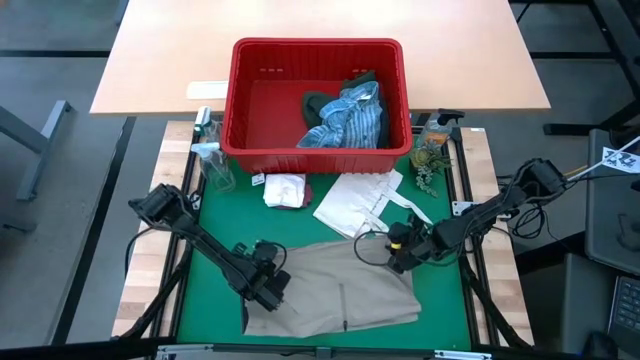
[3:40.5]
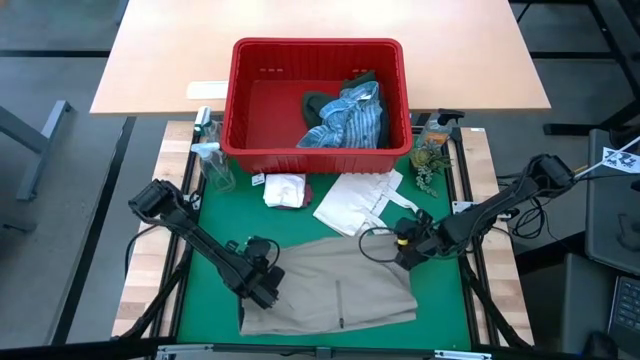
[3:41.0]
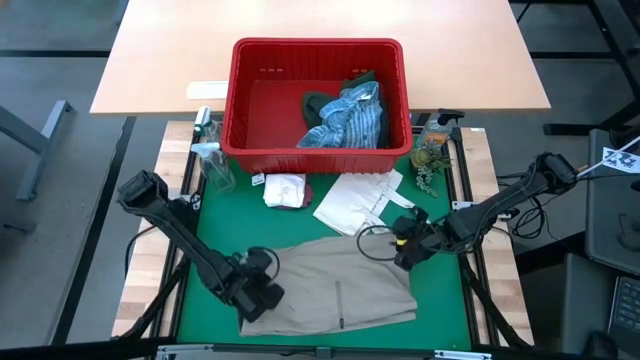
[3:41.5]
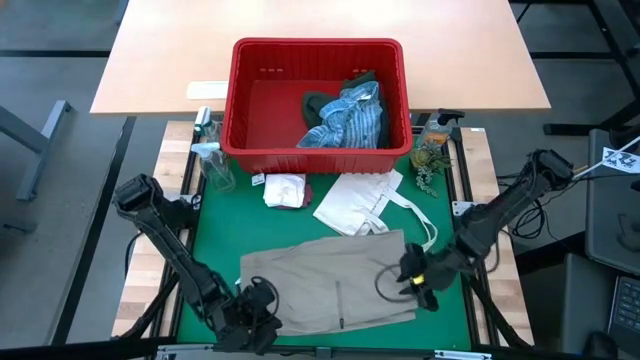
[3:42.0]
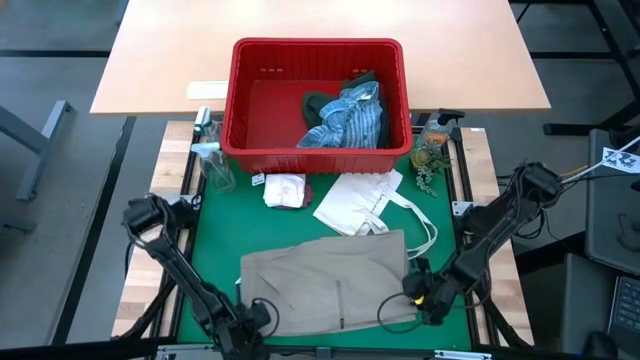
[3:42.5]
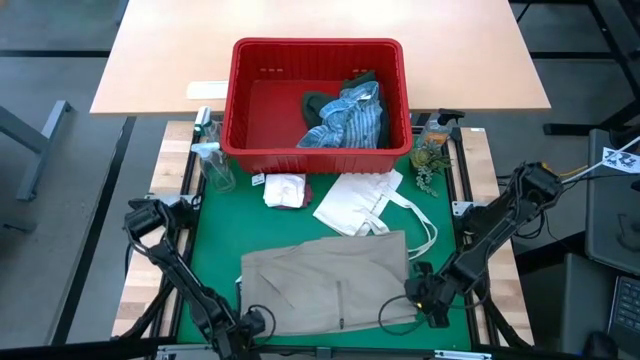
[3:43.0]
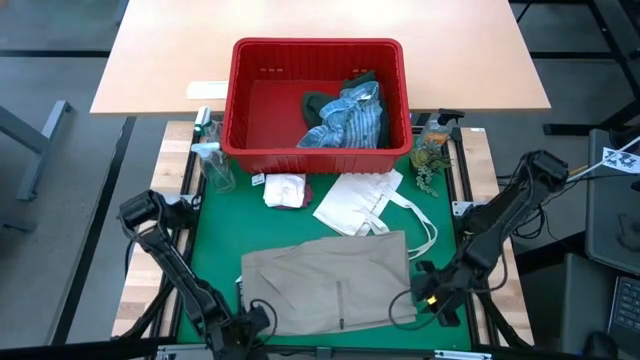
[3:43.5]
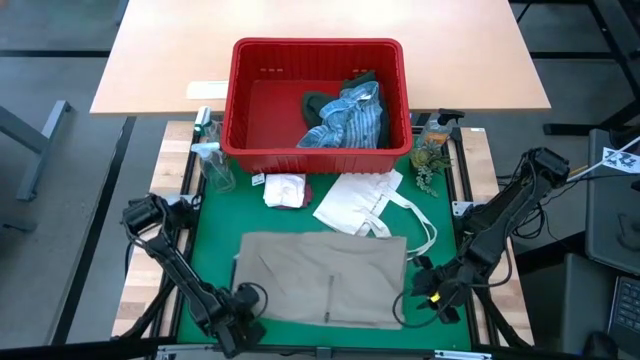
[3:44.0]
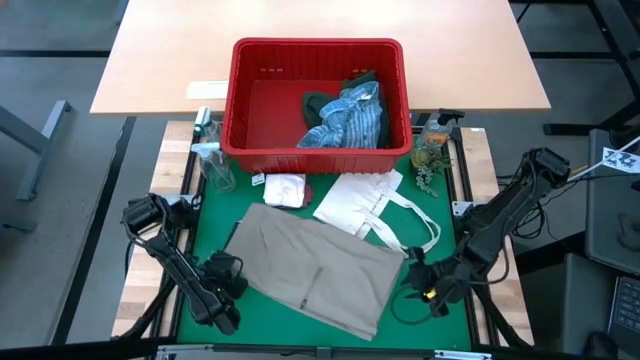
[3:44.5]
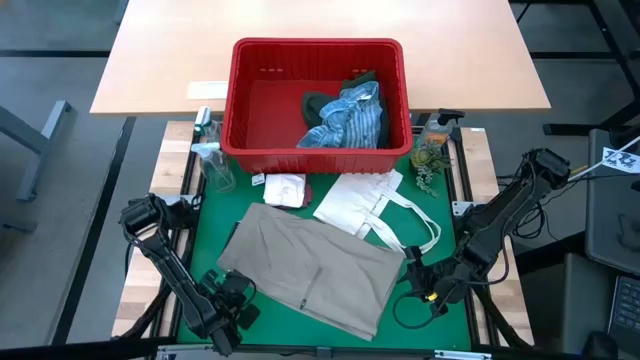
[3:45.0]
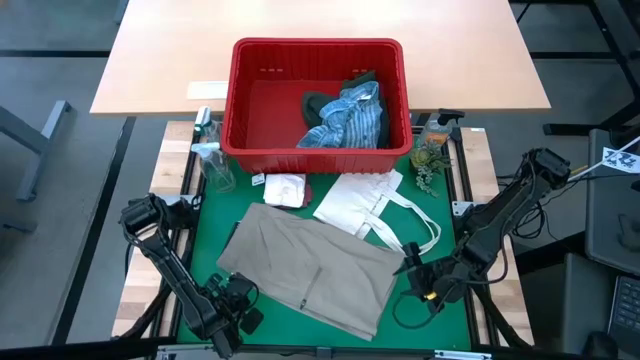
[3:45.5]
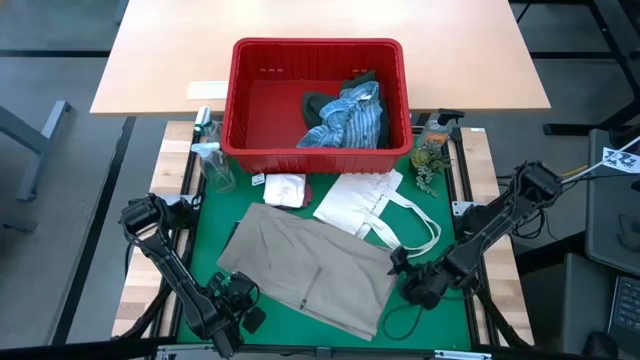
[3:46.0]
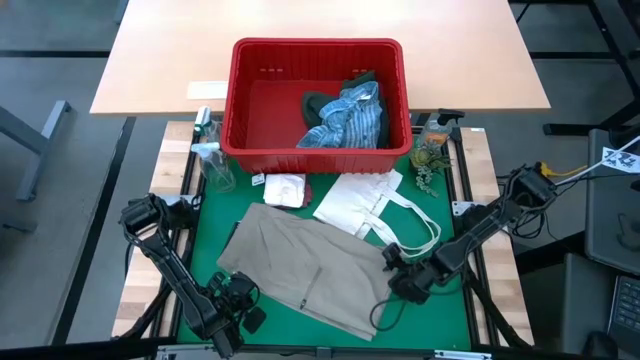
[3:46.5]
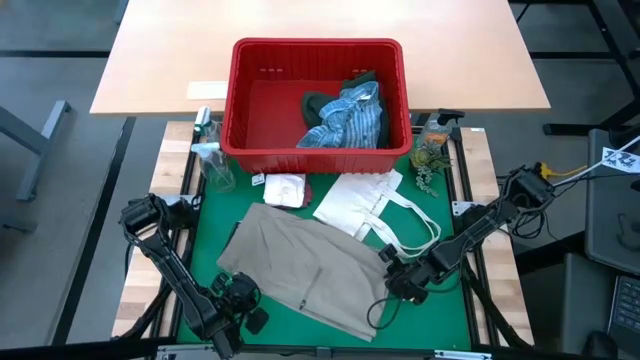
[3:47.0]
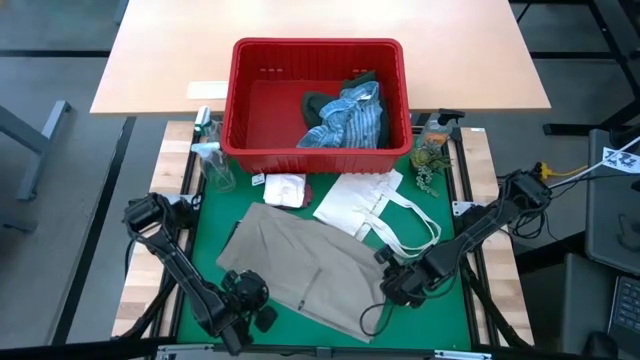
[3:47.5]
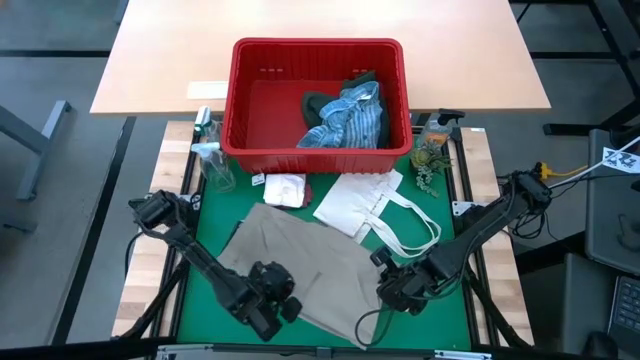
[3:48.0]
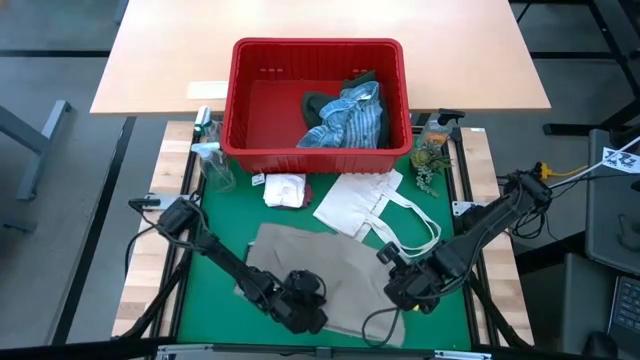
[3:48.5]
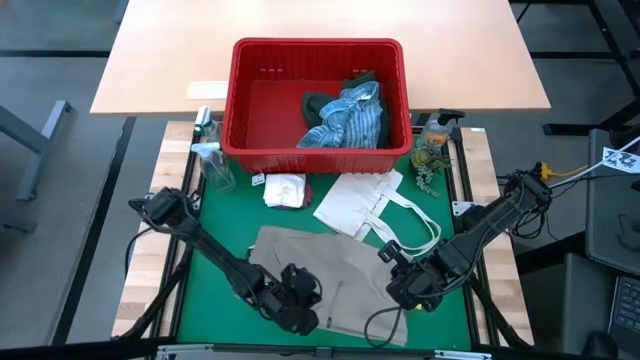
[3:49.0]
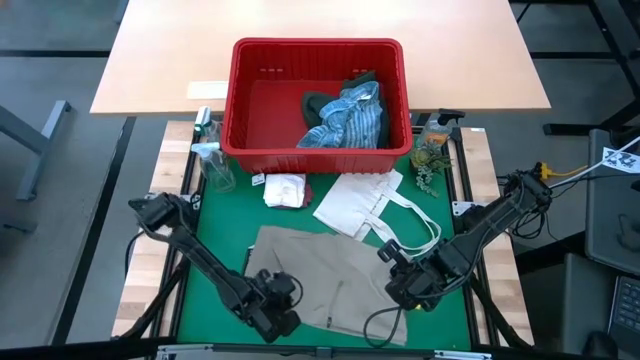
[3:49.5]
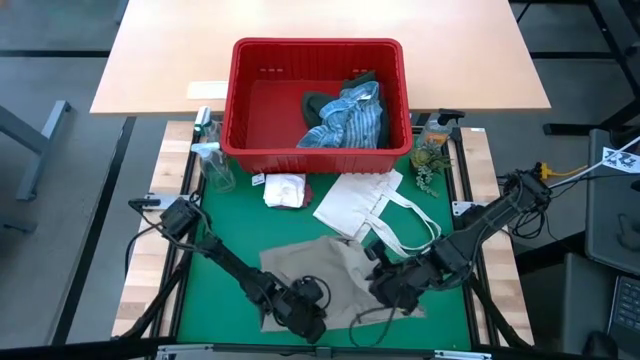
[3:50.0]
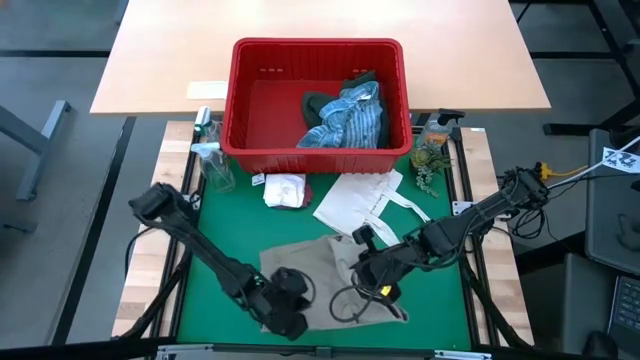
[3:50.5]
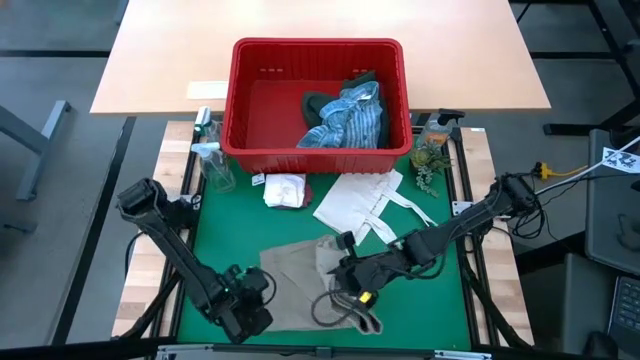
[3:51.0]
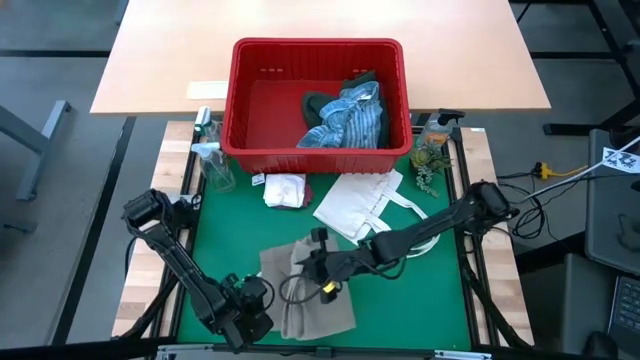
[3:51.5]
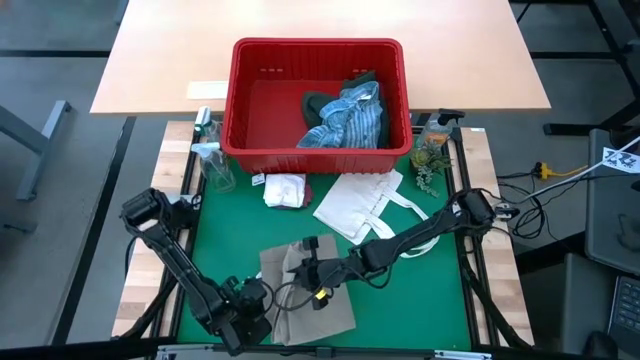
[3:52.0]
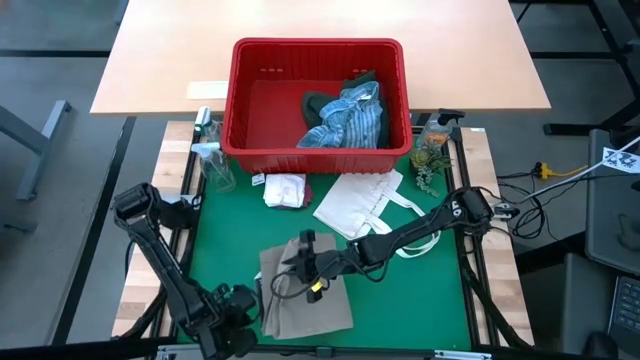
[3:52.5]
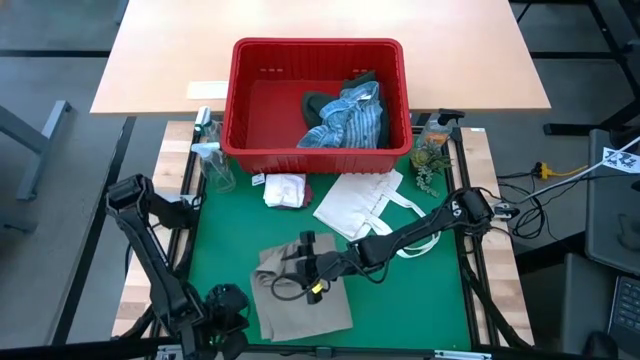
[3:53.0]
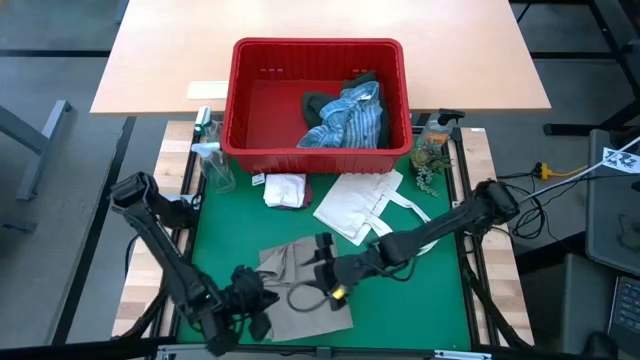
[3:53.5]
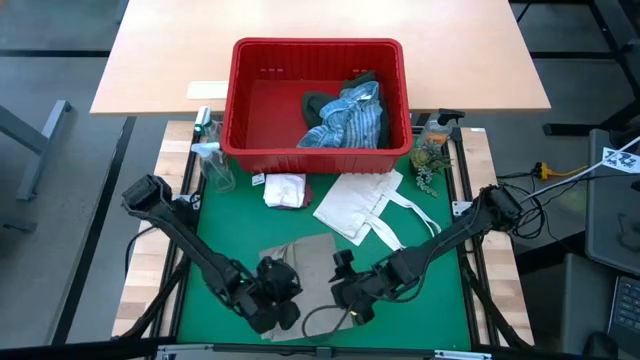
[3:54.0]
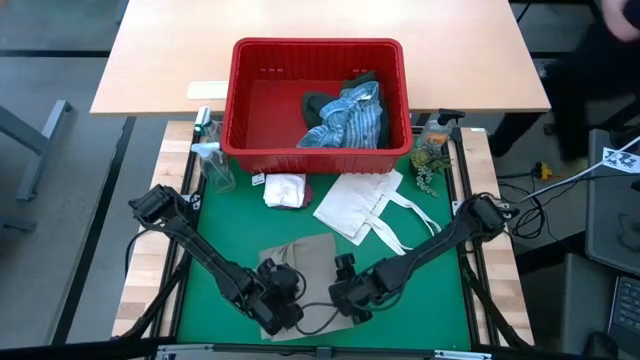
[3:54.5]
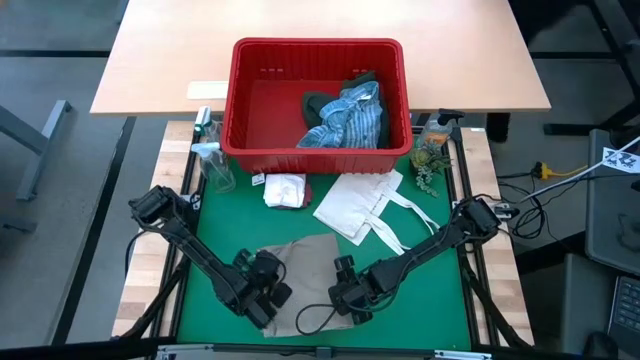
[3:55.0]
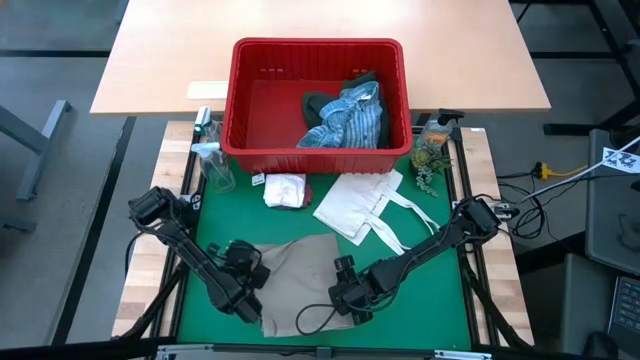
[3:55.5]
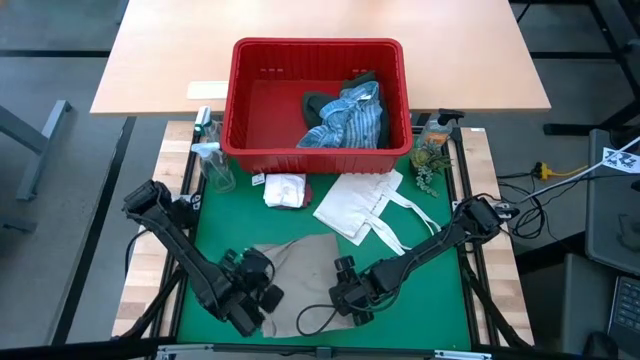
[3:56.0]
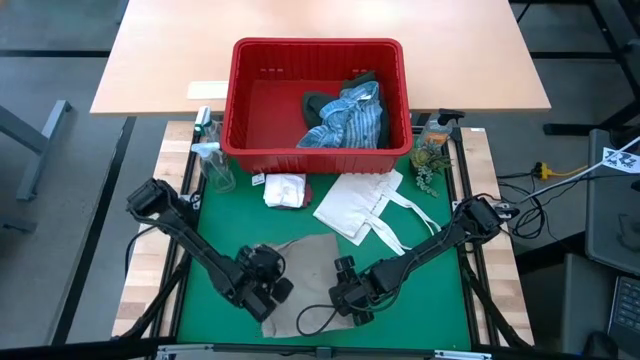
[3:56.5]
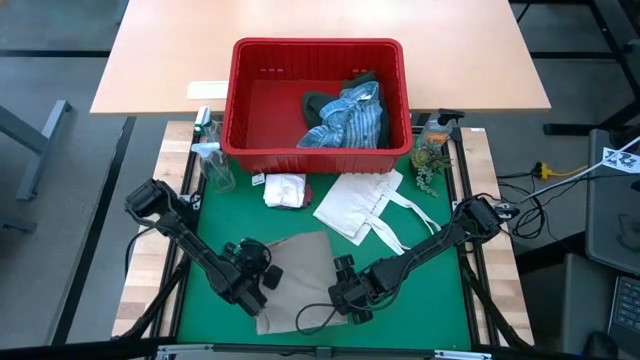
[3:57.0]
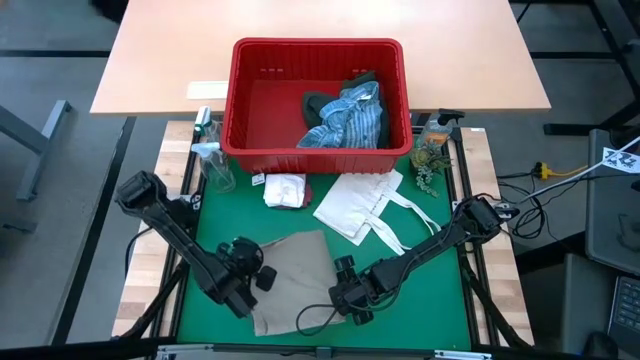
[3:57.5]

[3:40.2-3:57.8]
Task: Fold Laundry from Bin
Fold the gray shorts
